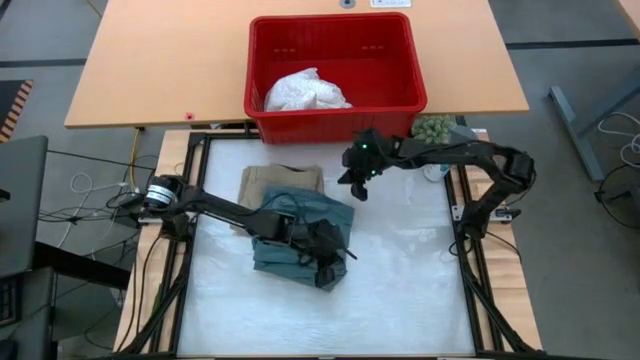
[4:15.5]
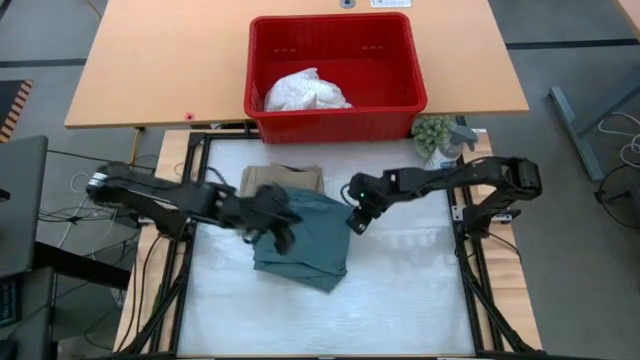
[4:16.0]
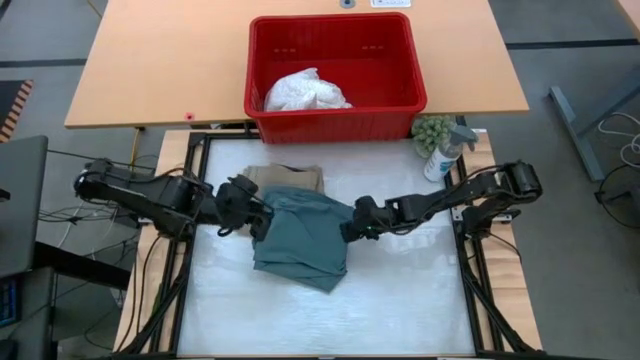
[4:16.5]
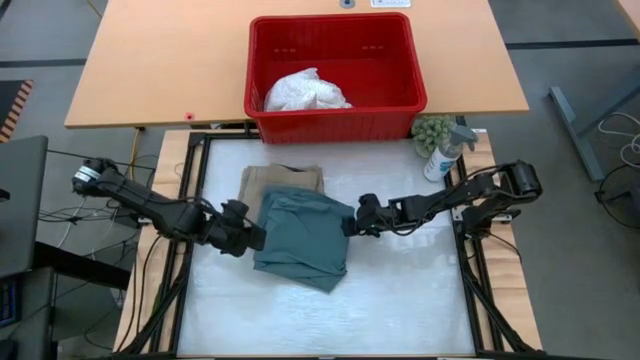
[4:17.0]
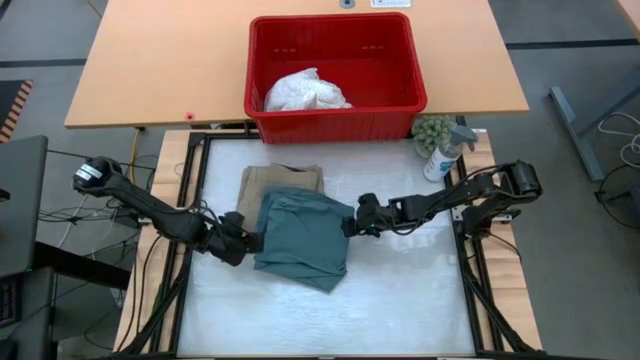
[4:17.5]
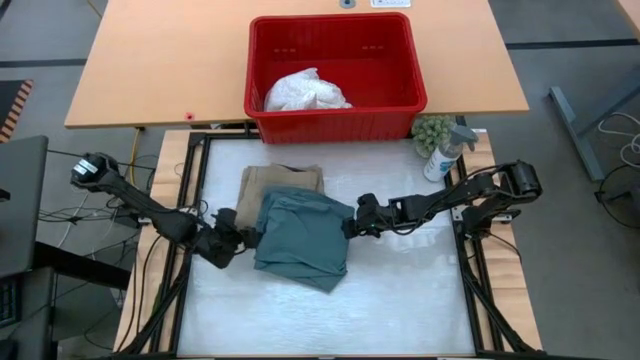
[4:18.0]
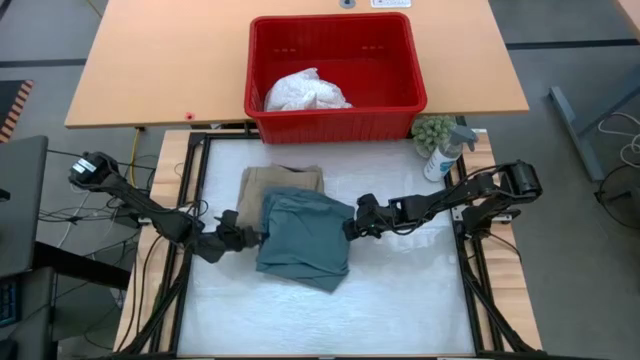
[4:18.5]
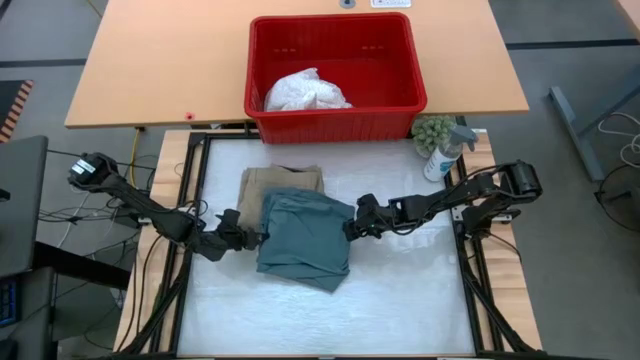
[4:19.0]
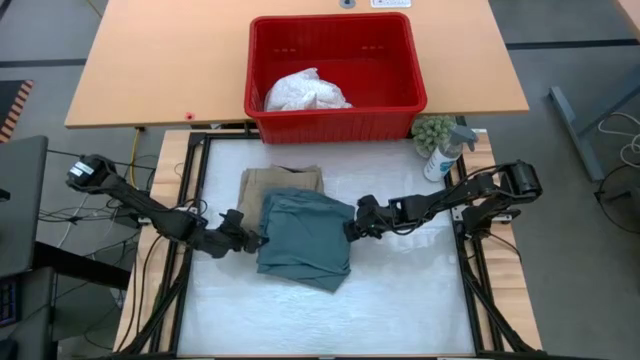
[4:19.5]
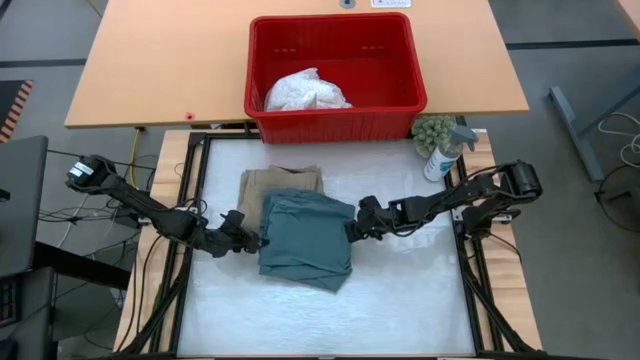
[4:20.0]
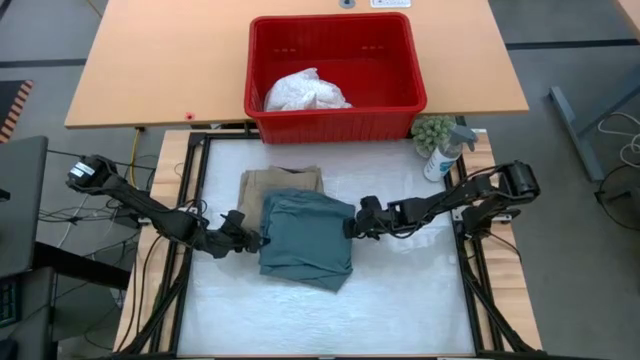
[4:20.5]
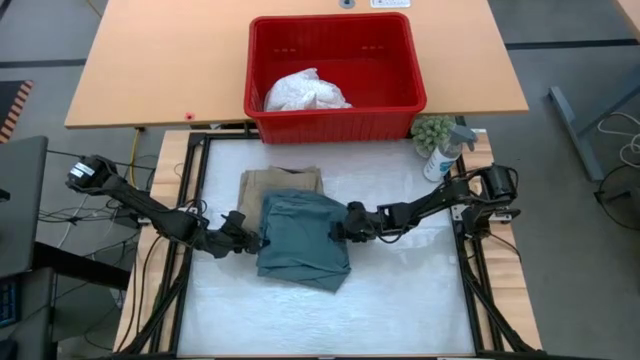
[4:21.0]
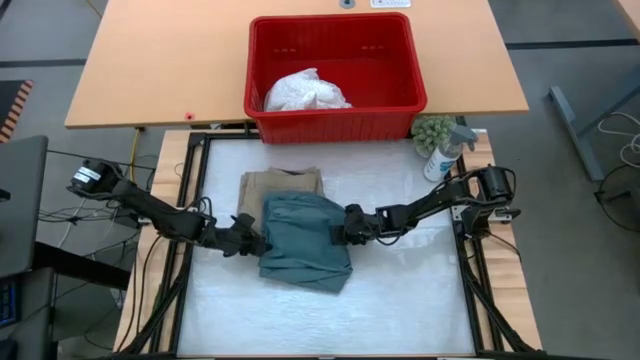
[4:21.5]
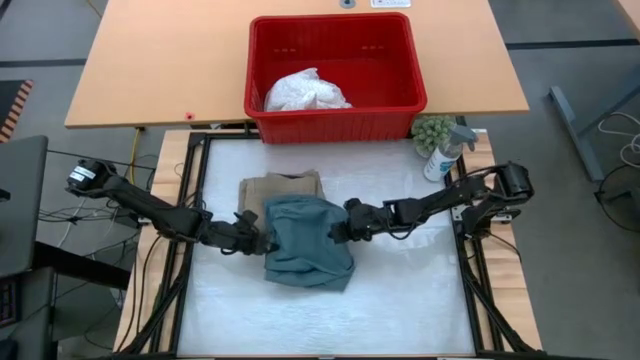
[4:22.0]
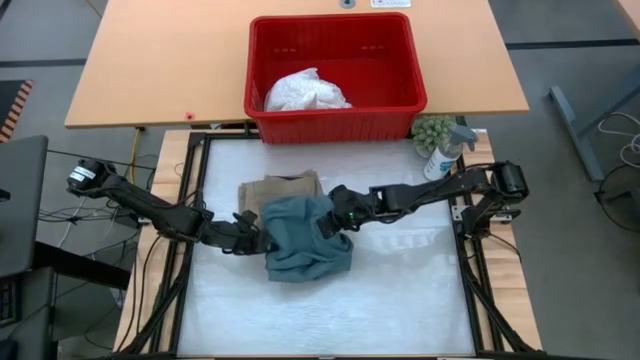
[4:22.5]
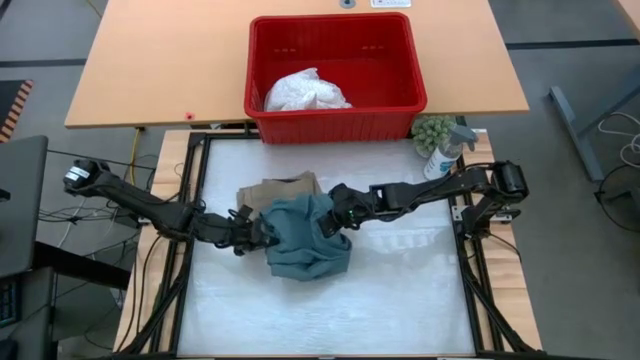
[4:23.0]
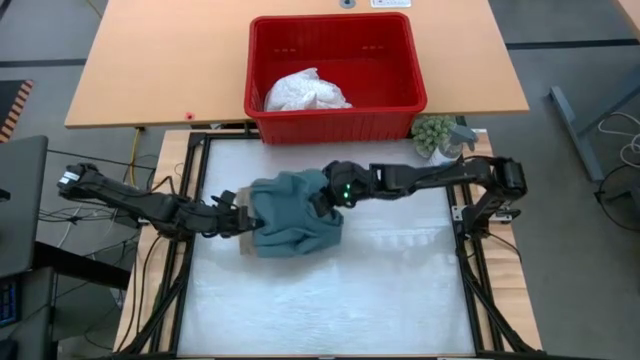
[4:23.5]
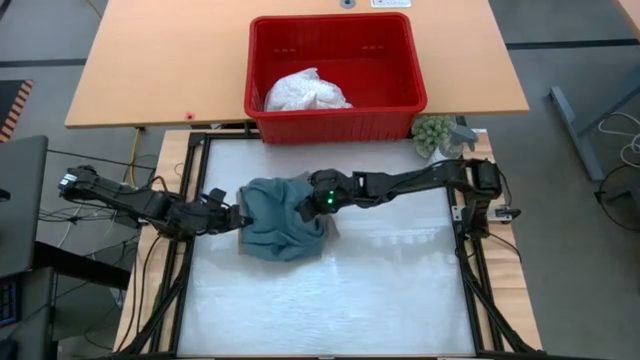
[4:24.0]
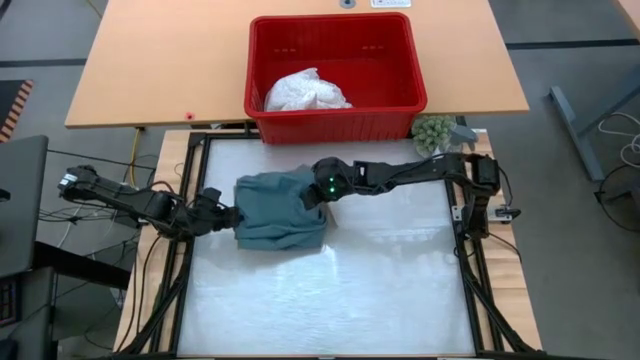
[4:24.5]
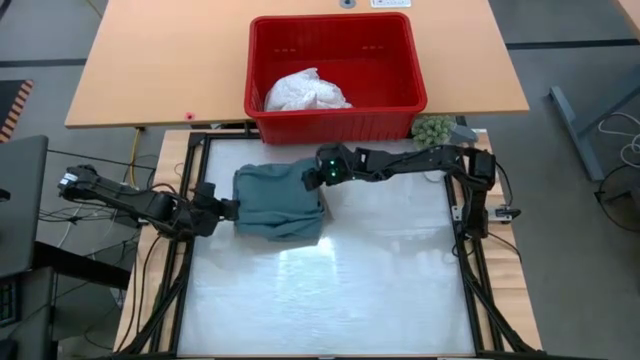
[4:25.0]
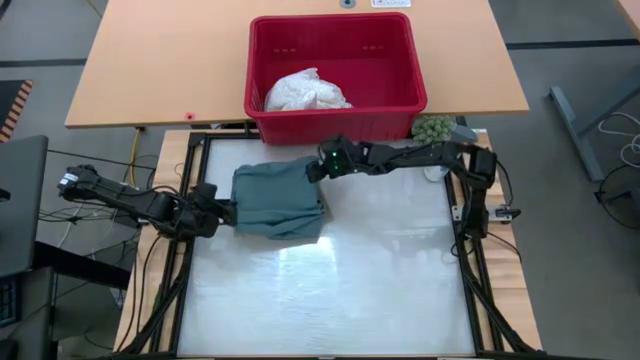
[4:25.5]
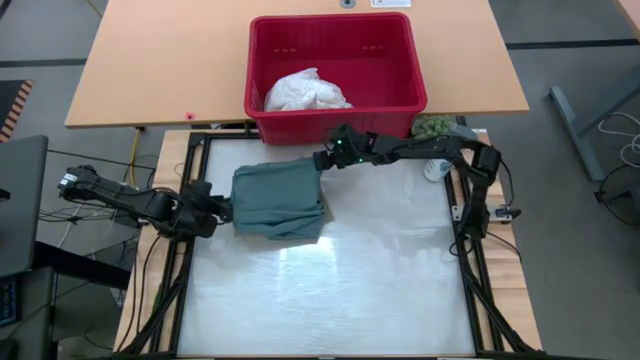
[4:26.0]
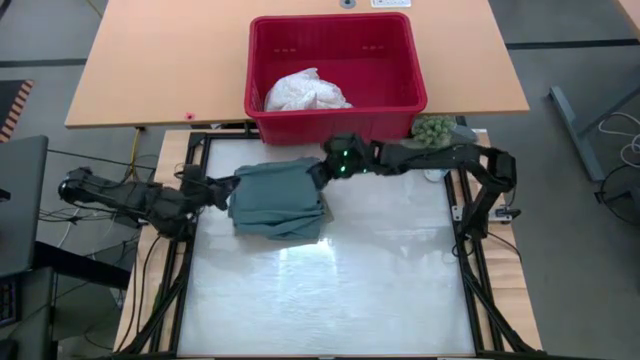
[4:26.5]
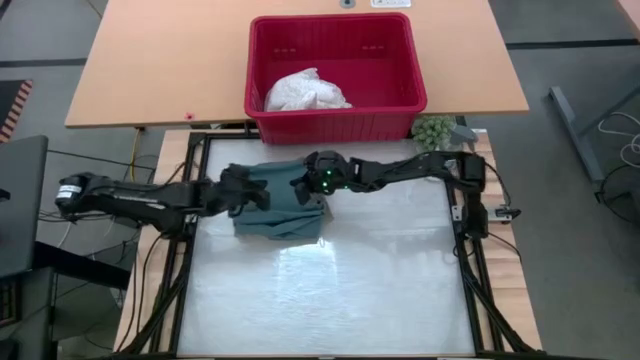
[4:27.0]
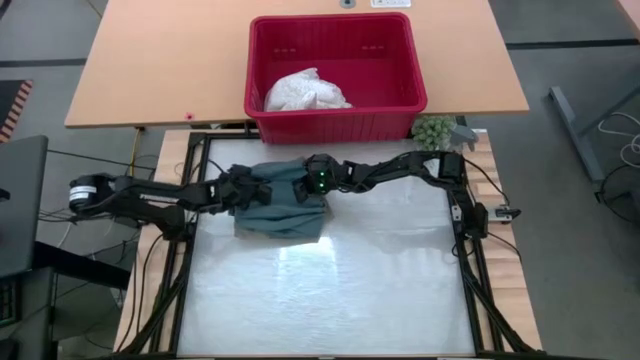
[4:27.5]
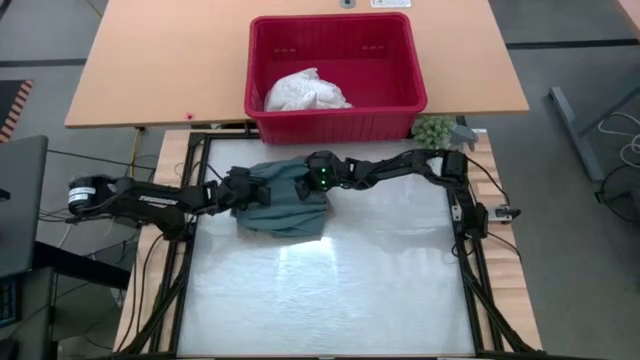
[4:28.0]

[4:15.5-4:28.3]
Task: Fold Laundry from Bin
Stack the folded blue pants on top of the folded brown short pants

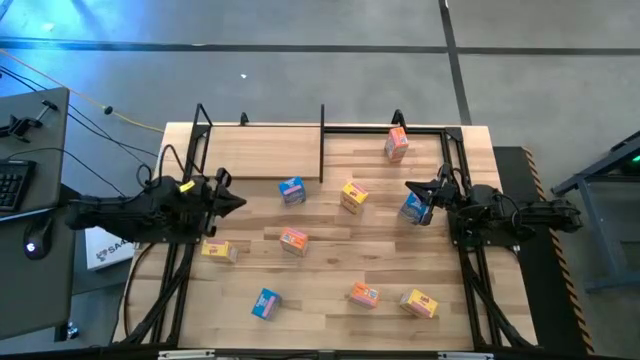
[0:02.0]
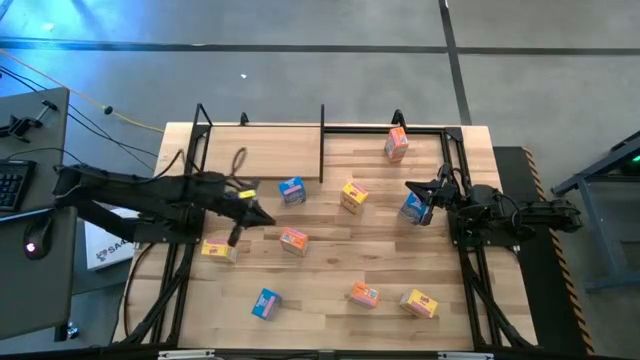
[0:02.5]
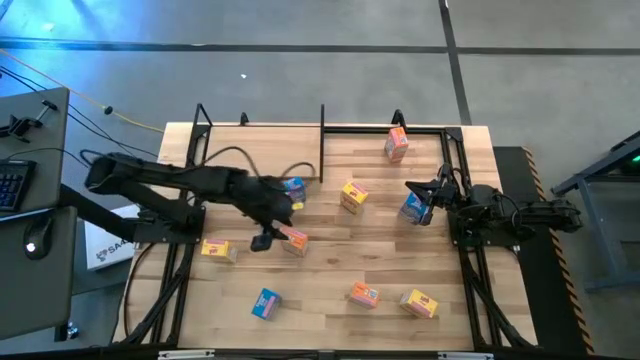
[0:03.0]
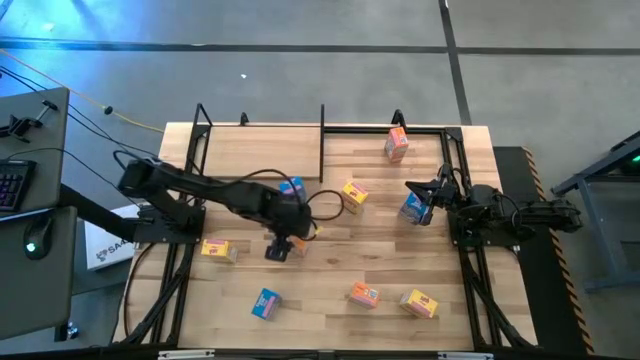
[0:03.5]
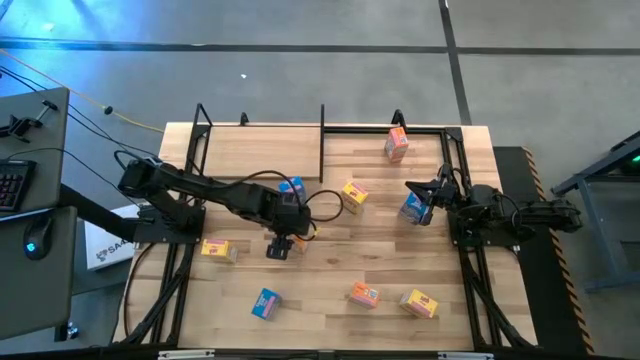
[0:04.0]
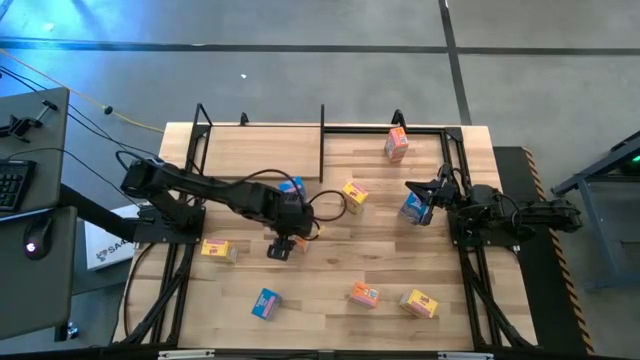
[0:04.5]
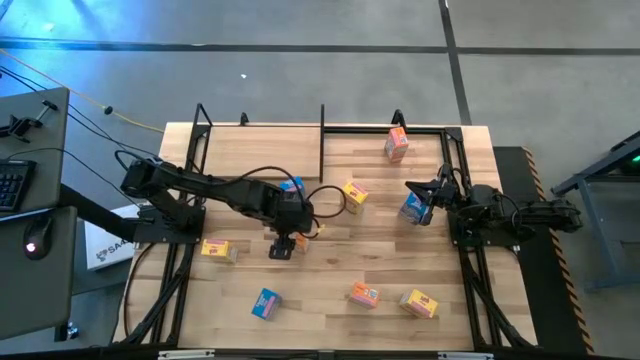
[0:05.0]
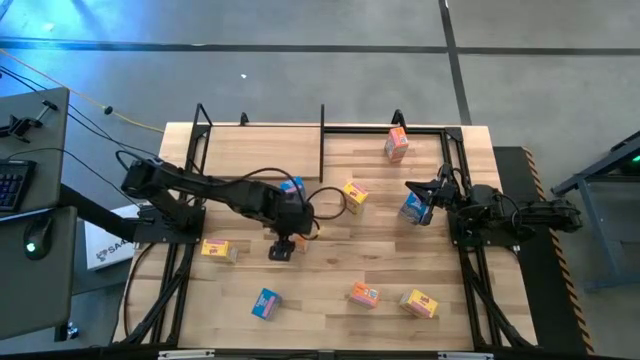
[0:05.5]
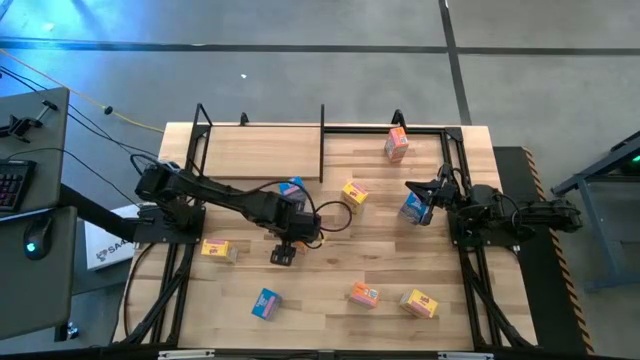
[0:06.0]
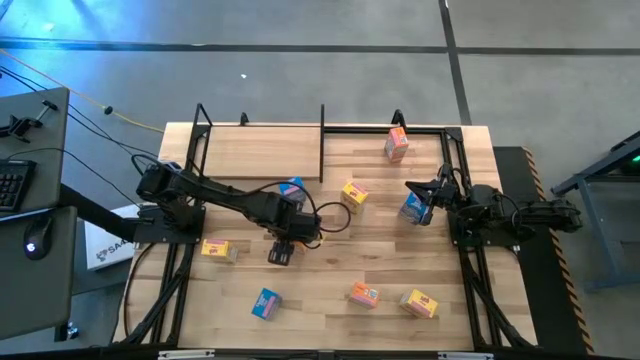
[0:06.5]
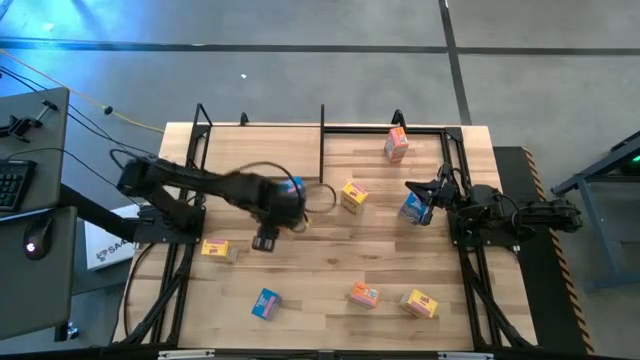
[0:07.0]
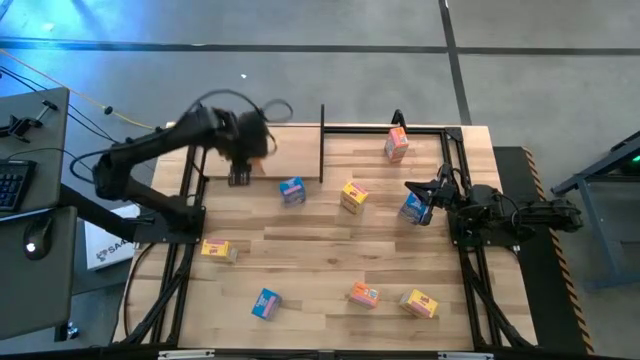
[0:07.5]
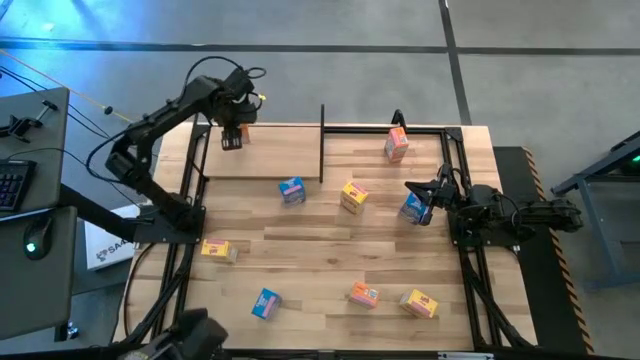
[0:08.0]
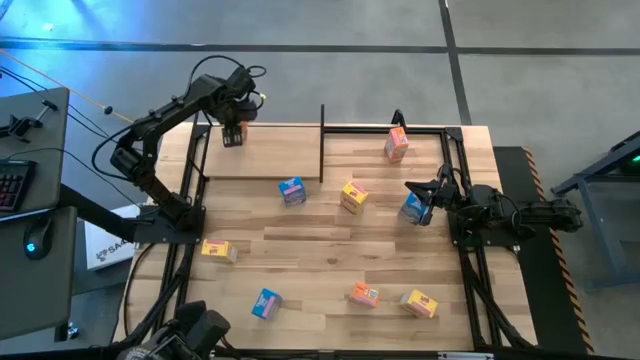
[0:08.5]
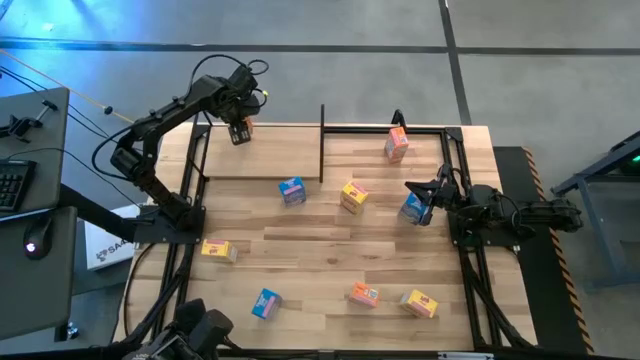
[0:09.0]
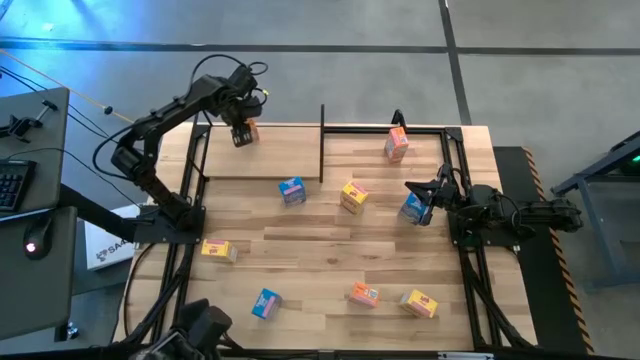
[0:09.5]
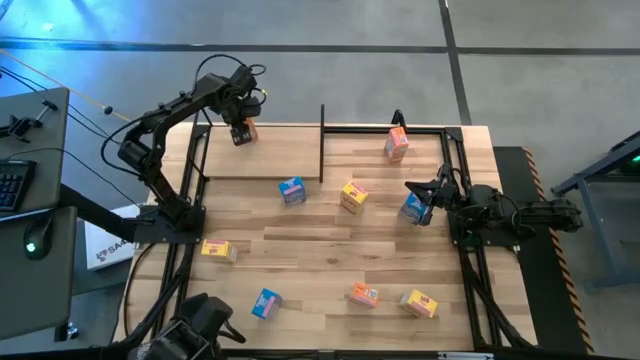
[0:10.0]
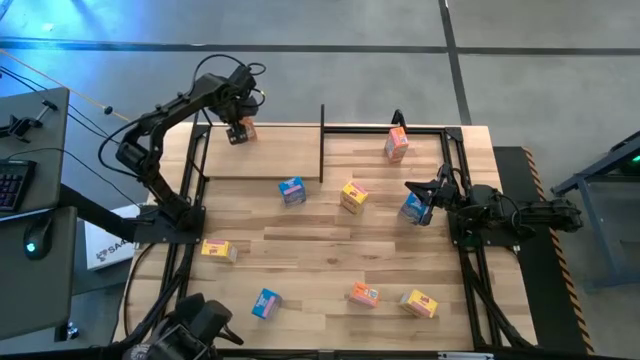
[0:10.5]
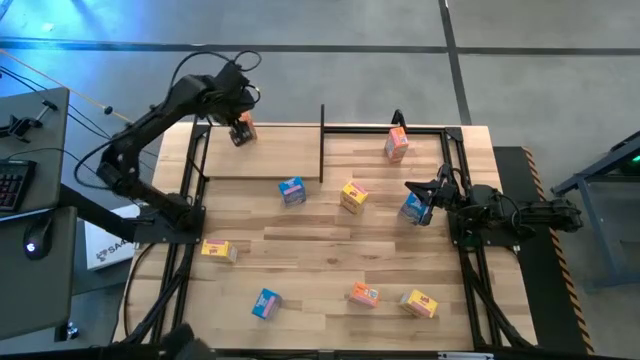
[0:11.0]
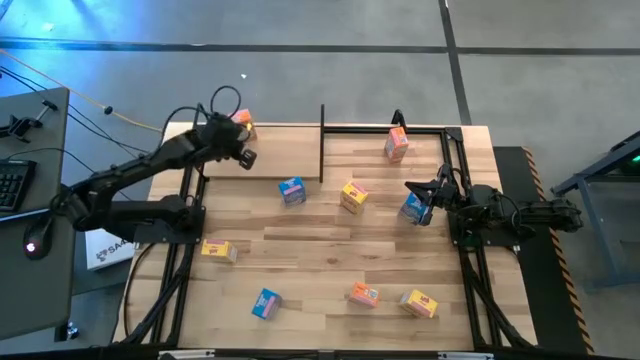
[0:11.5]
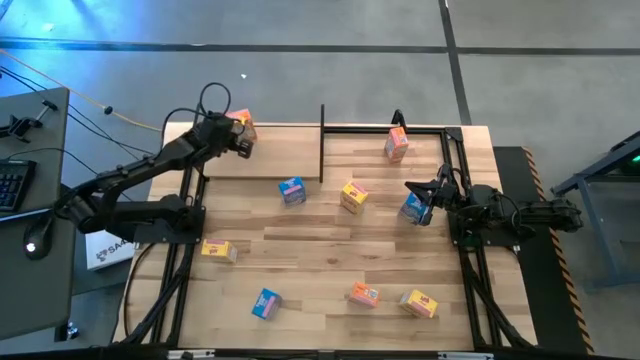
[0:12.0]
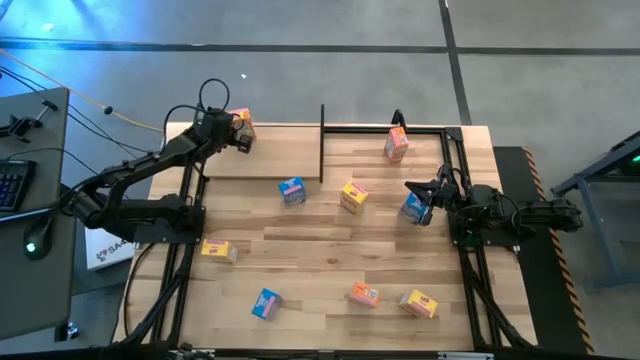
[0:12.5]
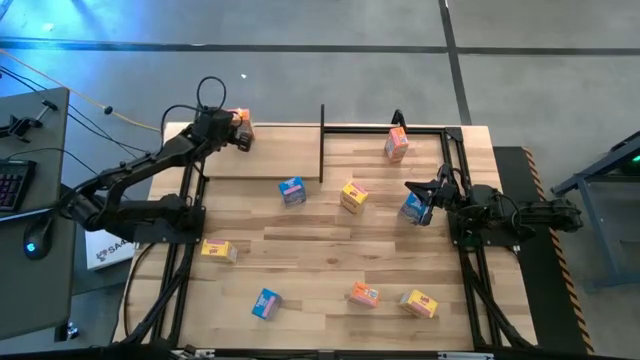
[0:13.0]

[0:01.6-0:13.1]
Task: Stack cereal on shelf
Put the middle orange cereal box on the shelf
